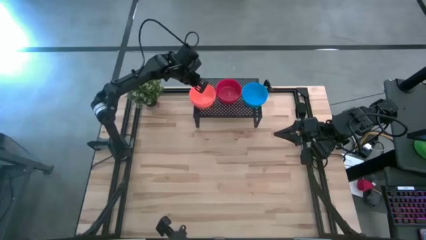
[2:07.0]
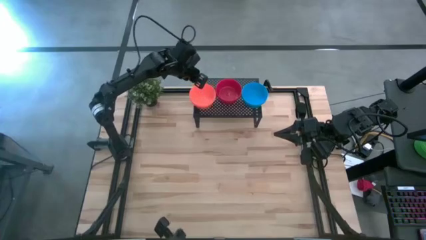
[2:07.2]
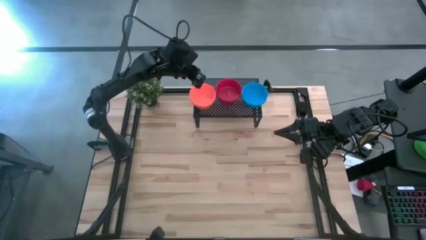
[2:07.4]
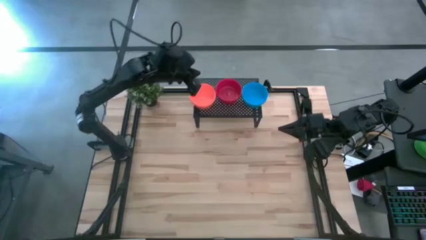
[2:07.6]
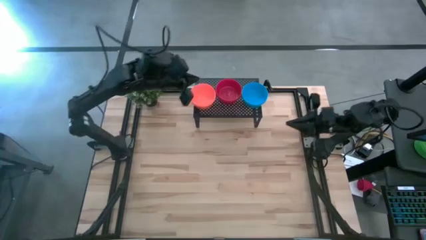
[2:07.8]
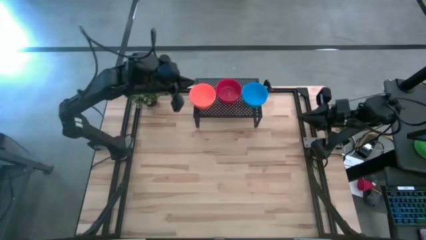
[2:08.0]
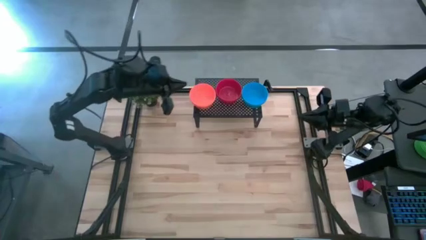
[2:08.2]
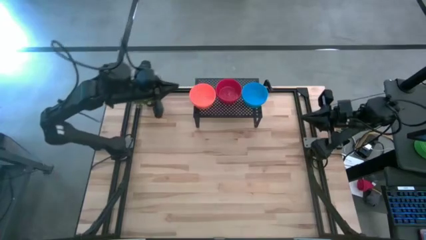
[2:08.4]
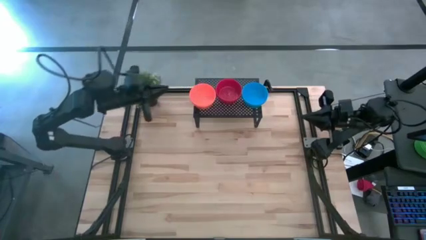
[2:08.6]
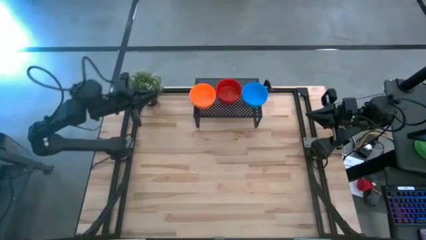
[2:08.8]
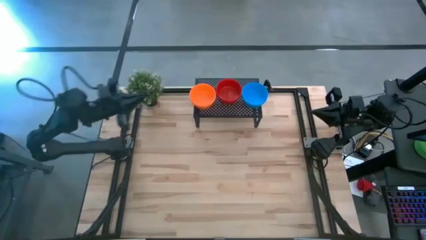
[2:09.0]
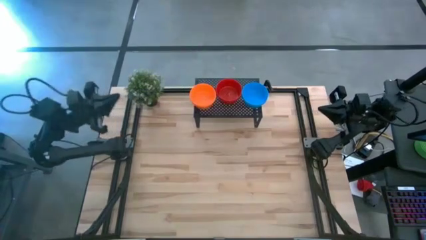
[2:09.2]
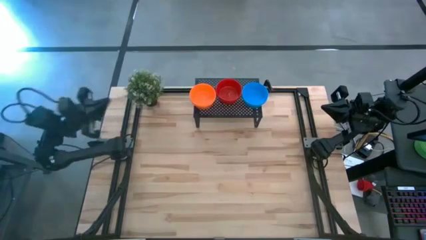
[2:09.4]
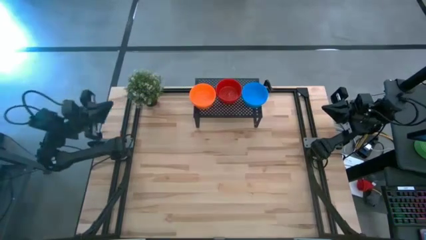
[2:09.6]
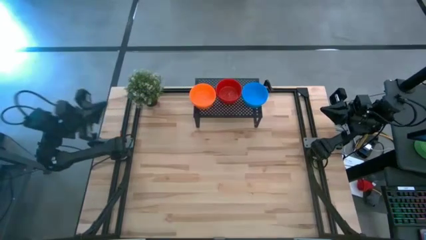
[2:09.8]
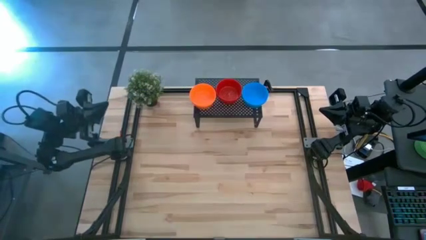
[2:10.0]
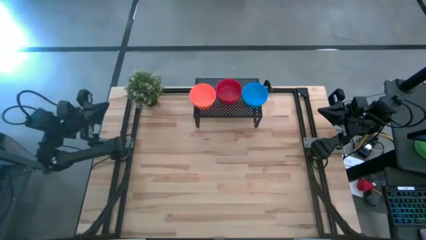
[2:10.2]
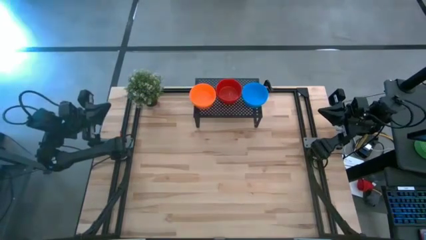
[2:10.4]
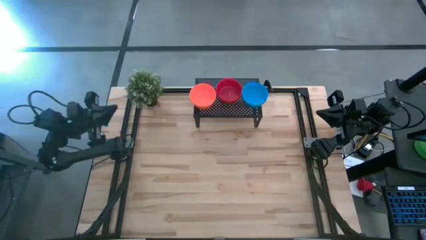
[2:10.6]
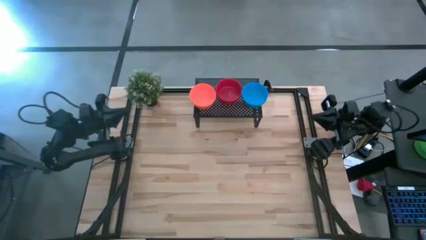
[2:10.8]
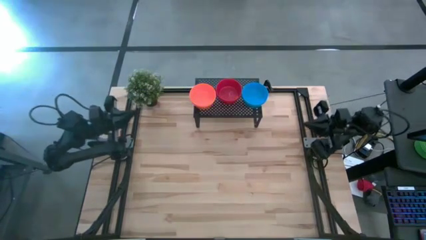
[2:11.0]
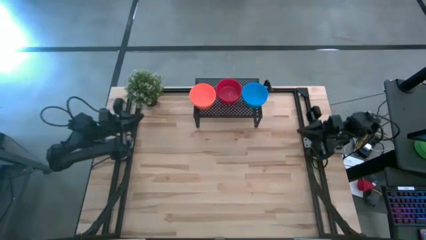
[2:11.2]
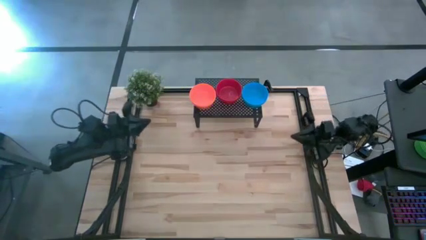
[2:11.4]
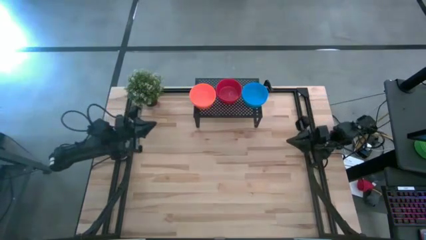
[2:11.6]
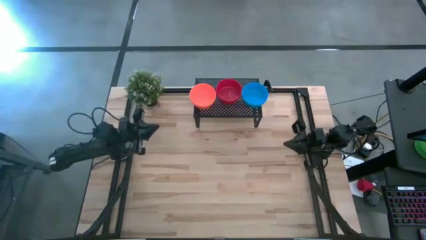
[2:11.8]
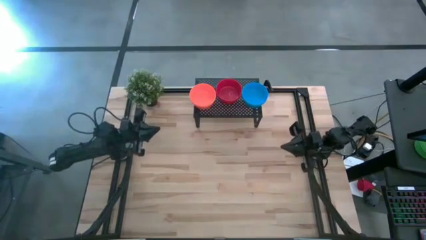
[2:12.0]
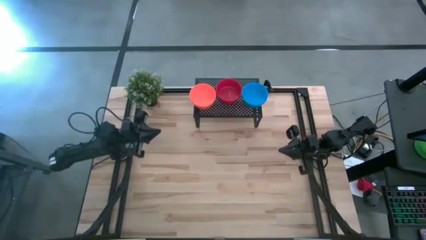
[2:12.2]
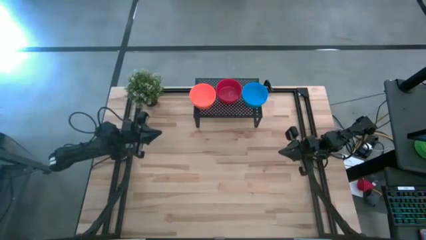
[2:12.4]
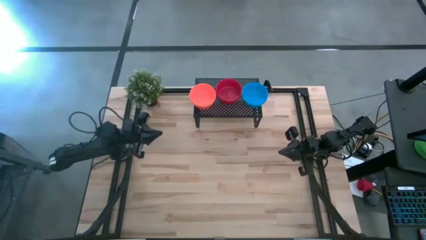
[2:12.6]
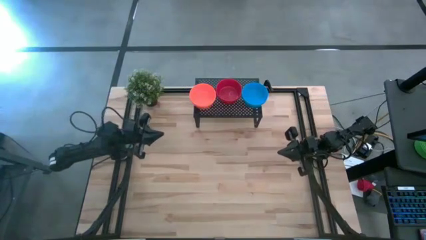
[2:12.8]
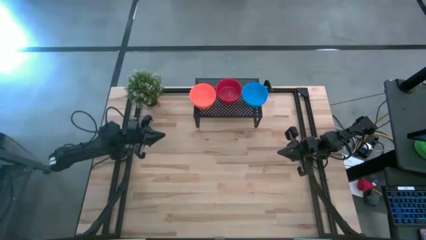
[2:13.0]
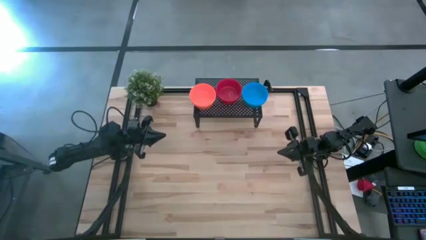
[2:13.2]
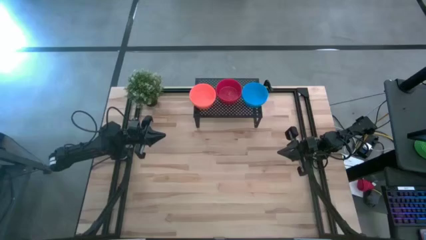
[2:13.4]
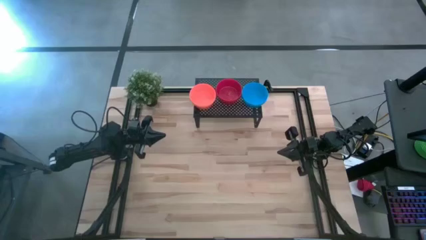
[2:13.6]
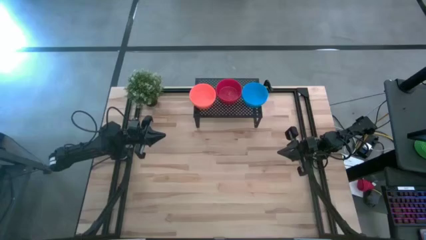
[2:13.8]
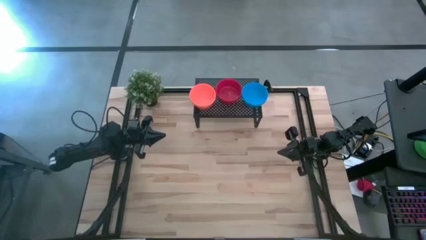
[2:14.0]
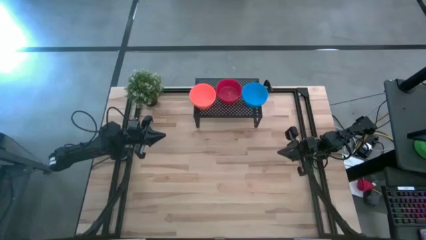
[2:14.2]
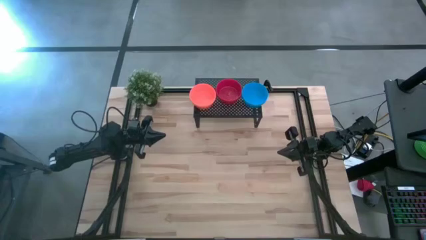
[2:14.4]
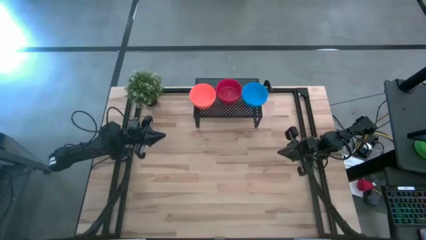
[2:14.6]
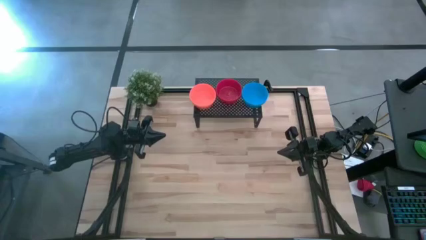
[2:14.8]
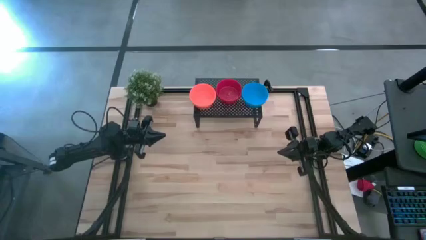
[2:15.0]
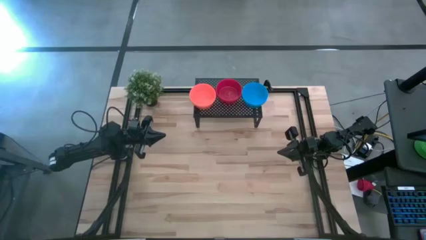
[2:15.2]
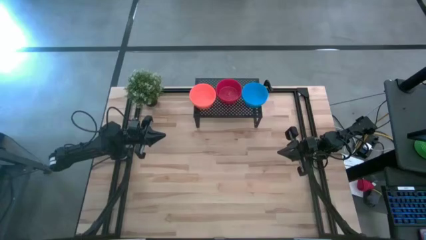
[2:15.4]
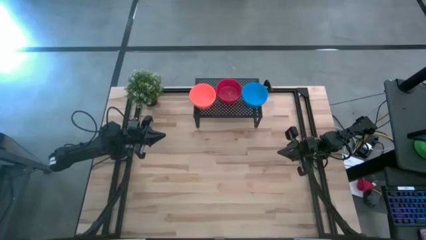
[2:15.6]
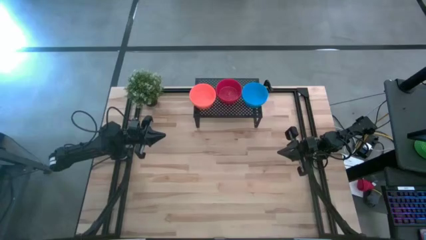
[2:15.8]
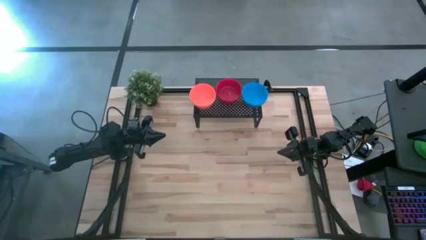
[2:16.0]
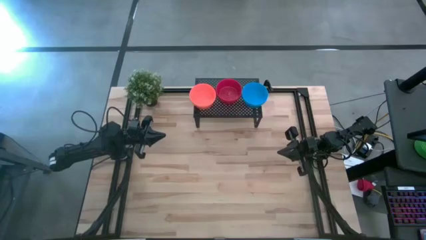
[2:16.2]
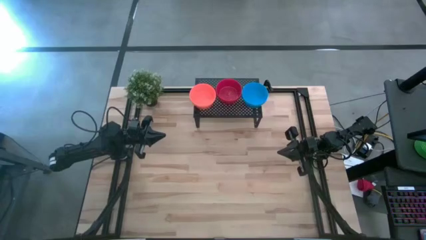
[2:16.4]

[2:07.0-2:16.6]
Task: Pick & Place Mini bowls
Return to Home Position
